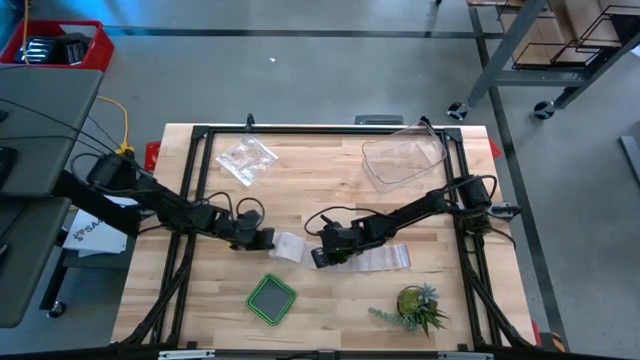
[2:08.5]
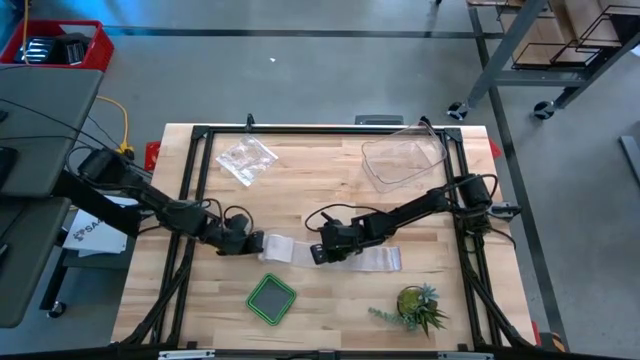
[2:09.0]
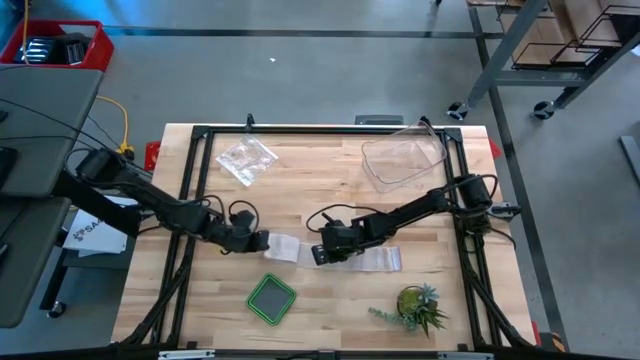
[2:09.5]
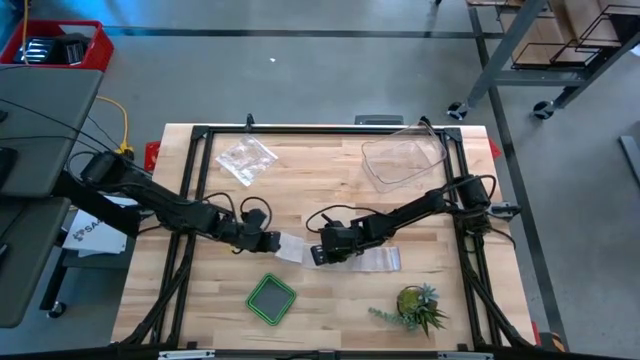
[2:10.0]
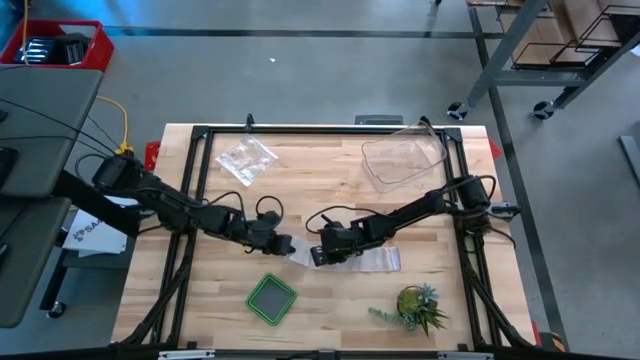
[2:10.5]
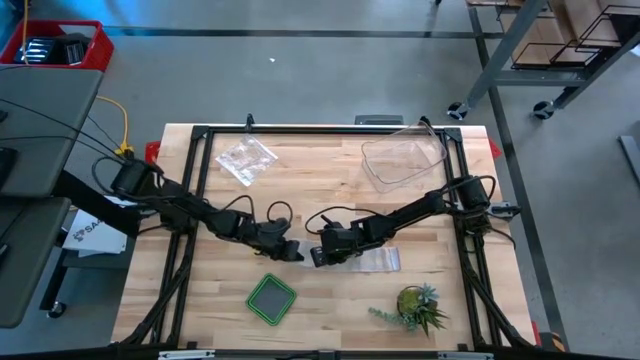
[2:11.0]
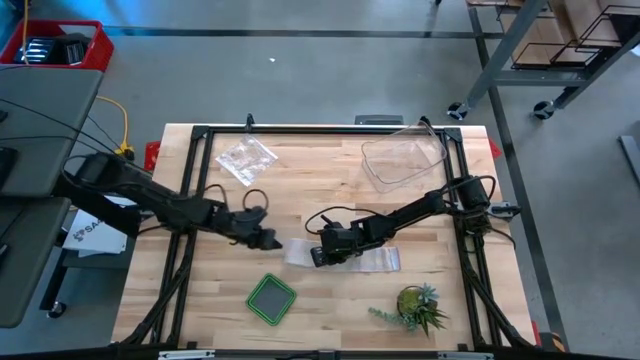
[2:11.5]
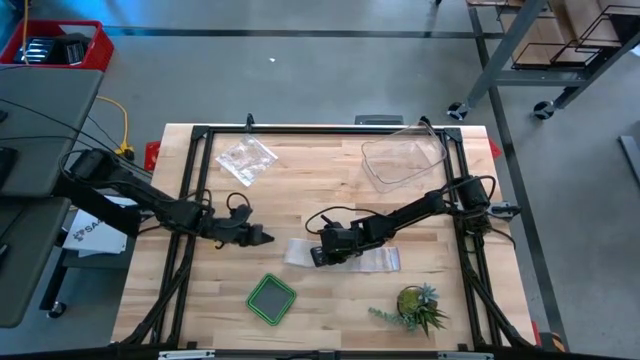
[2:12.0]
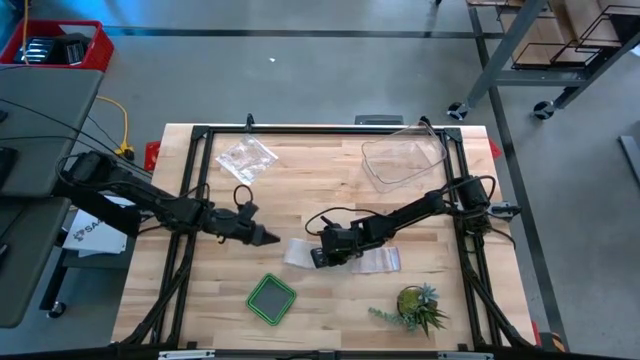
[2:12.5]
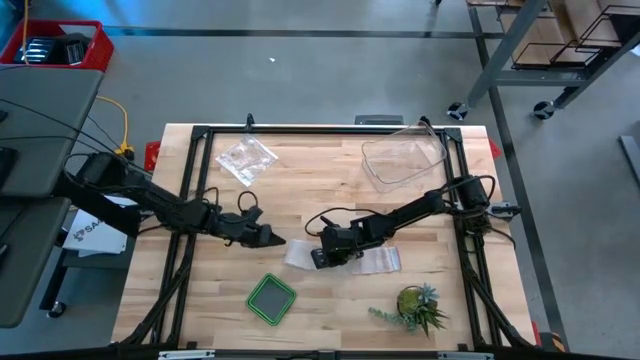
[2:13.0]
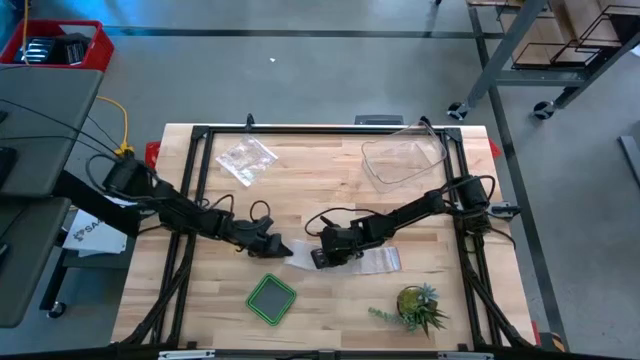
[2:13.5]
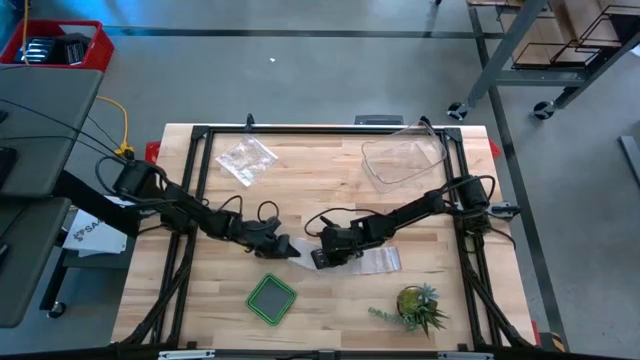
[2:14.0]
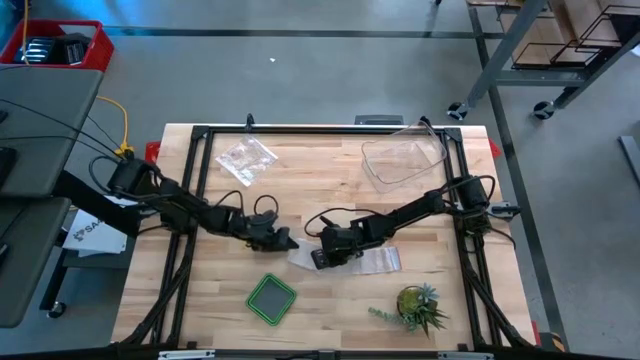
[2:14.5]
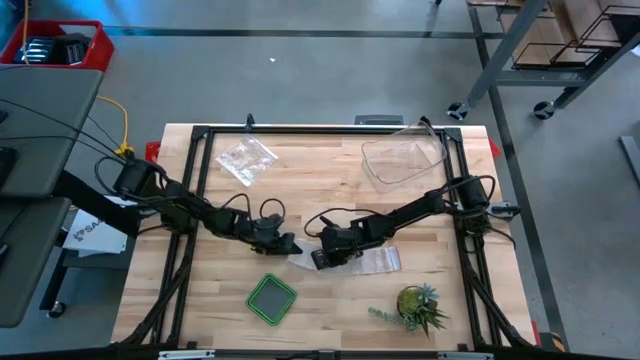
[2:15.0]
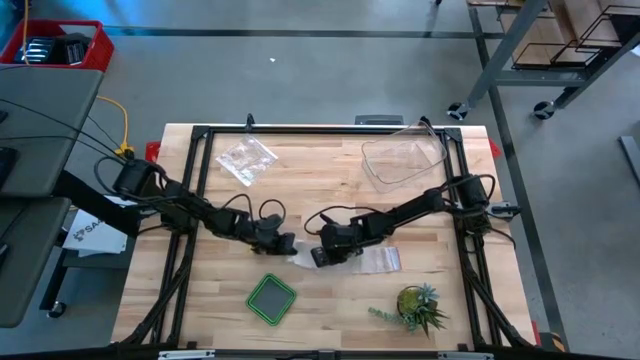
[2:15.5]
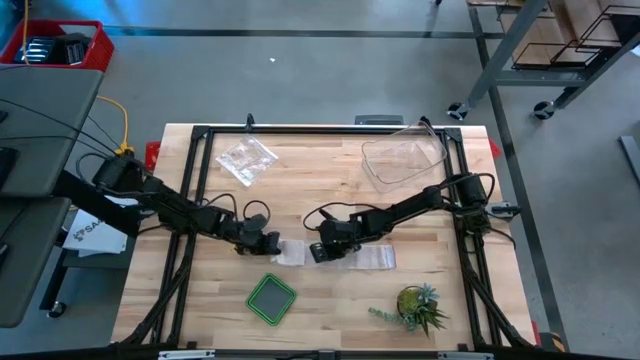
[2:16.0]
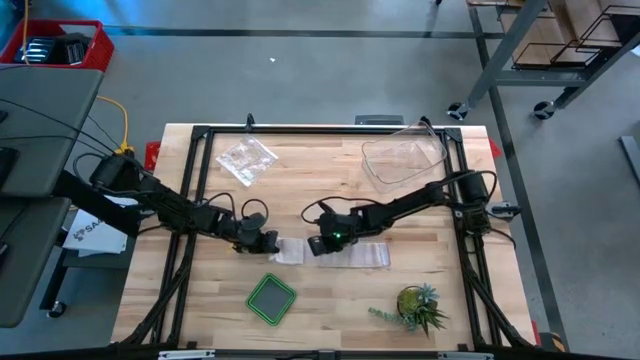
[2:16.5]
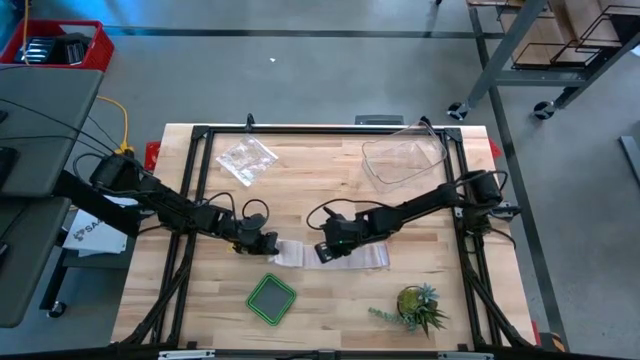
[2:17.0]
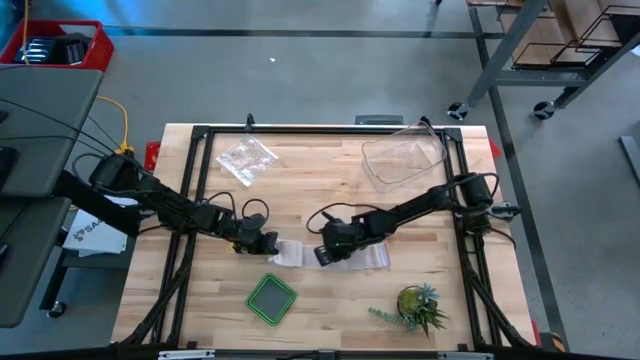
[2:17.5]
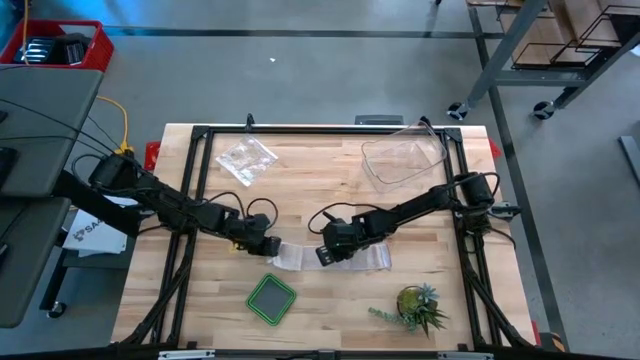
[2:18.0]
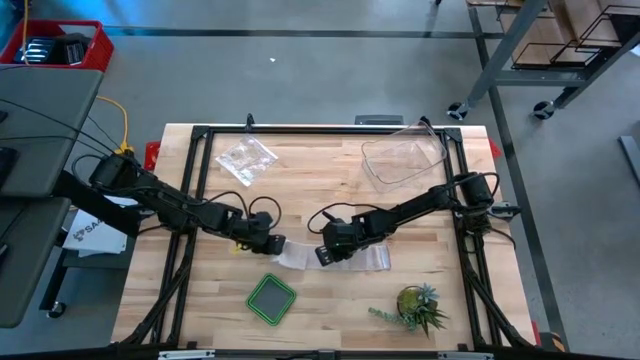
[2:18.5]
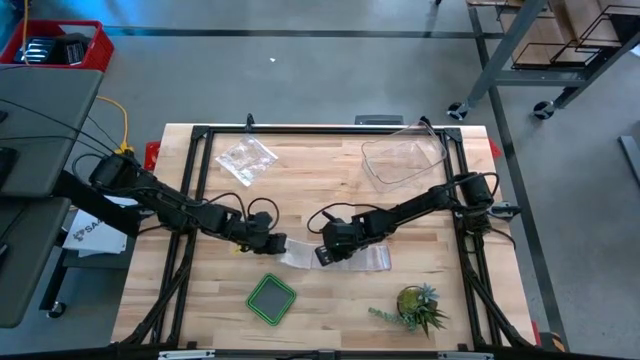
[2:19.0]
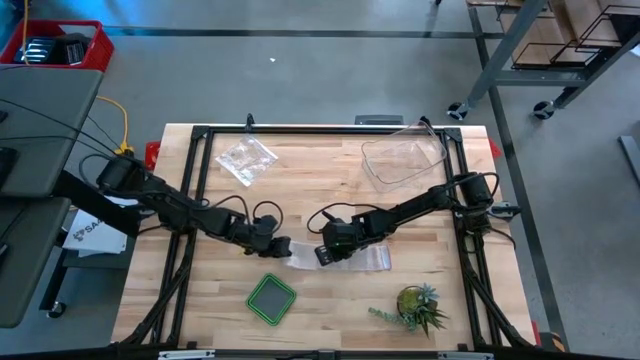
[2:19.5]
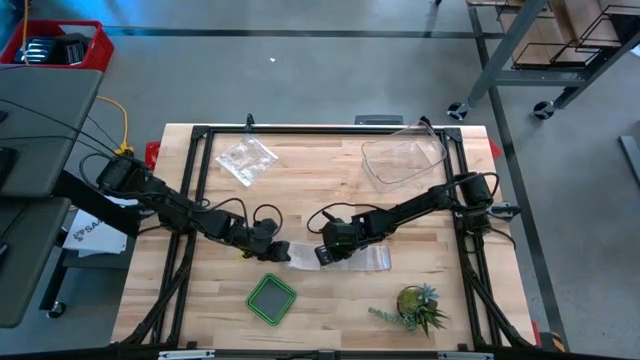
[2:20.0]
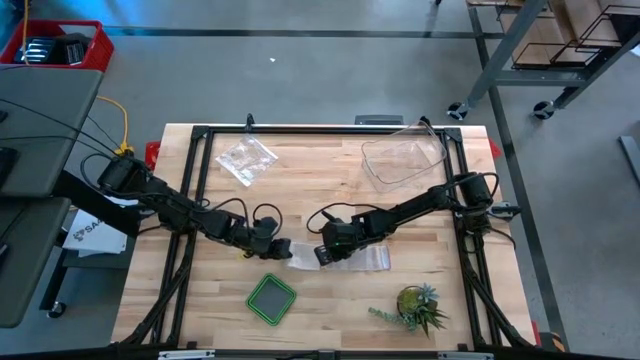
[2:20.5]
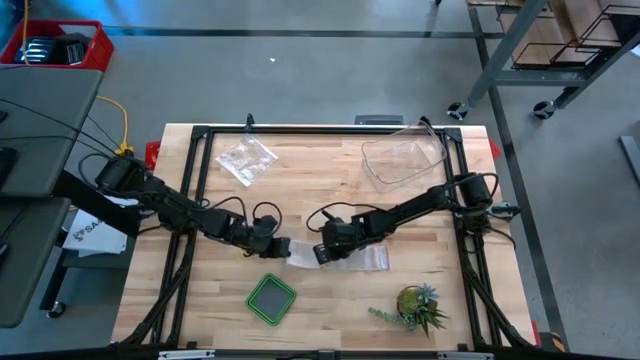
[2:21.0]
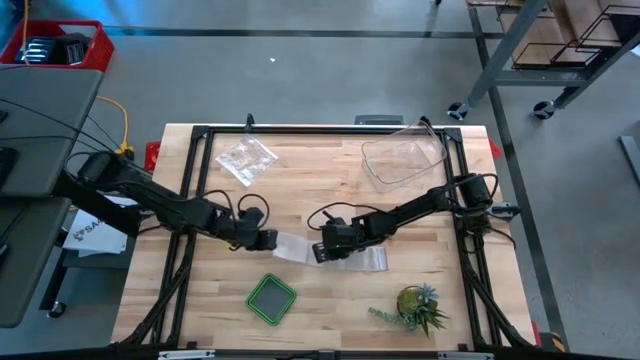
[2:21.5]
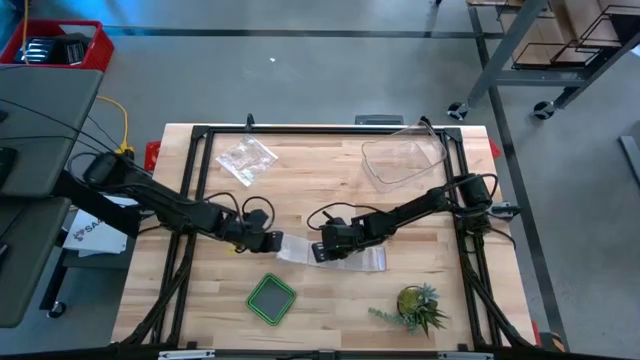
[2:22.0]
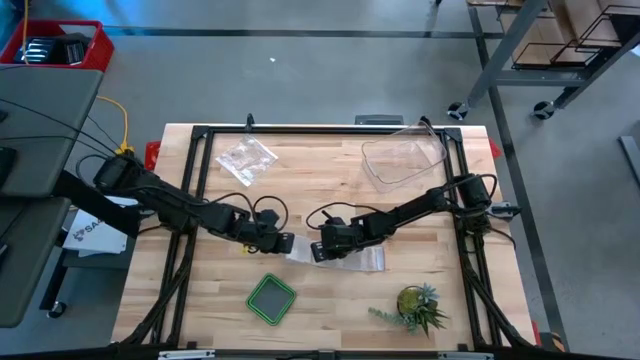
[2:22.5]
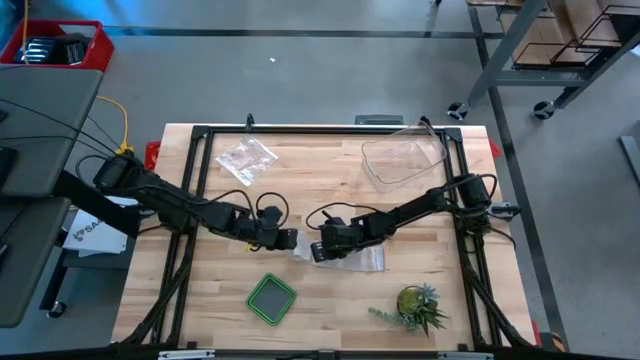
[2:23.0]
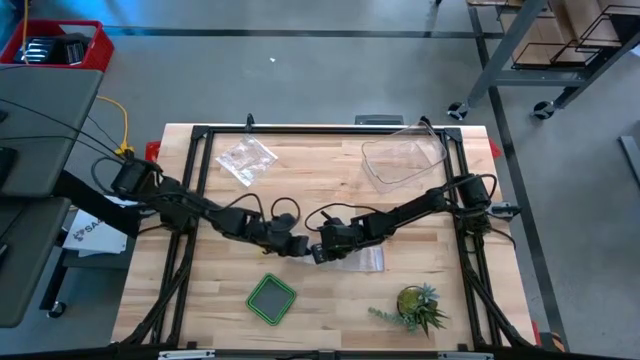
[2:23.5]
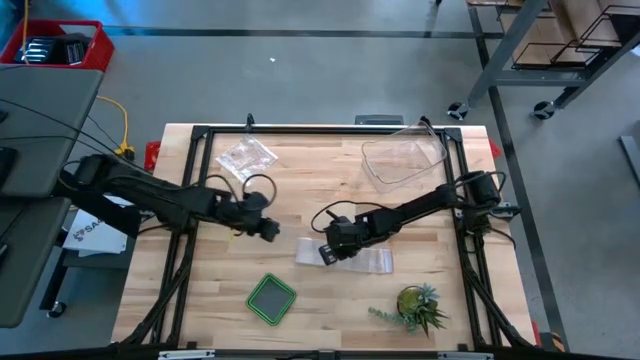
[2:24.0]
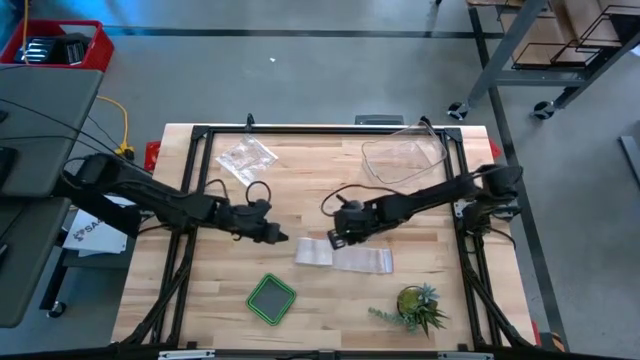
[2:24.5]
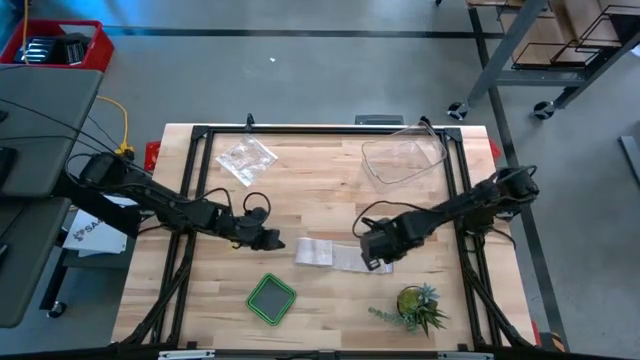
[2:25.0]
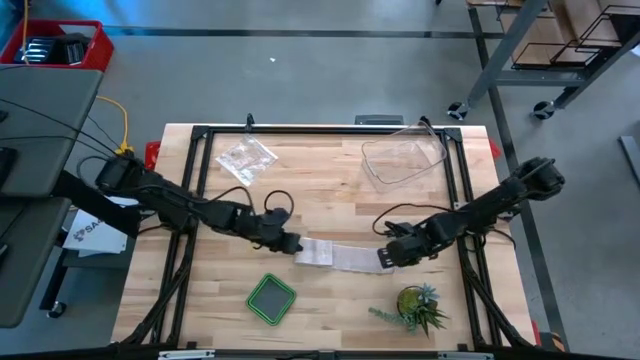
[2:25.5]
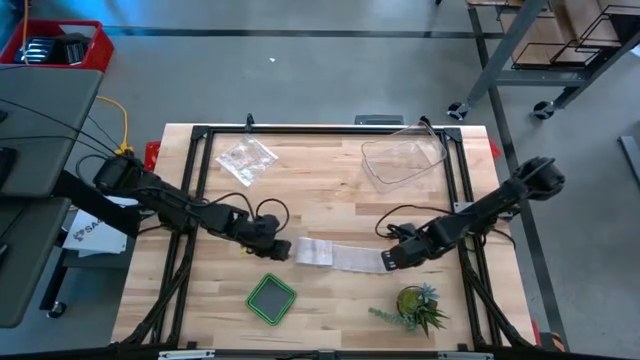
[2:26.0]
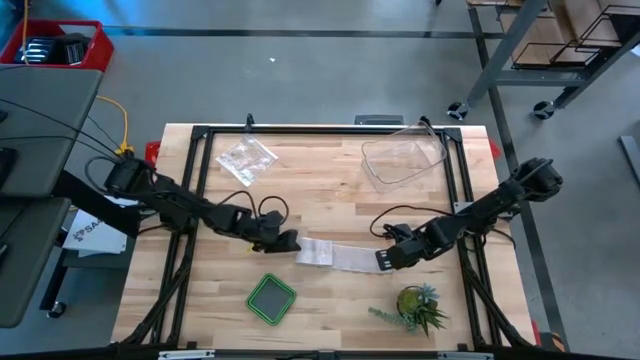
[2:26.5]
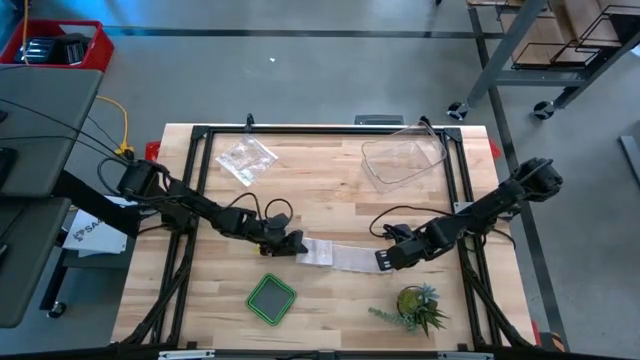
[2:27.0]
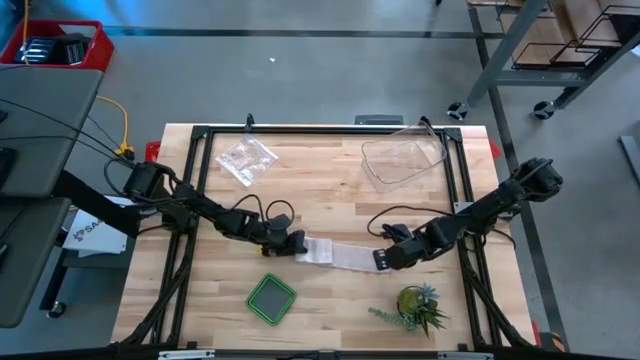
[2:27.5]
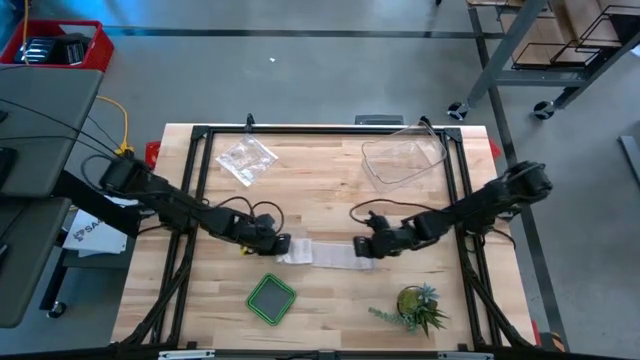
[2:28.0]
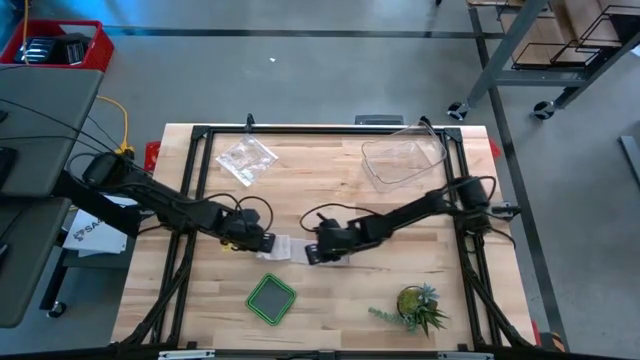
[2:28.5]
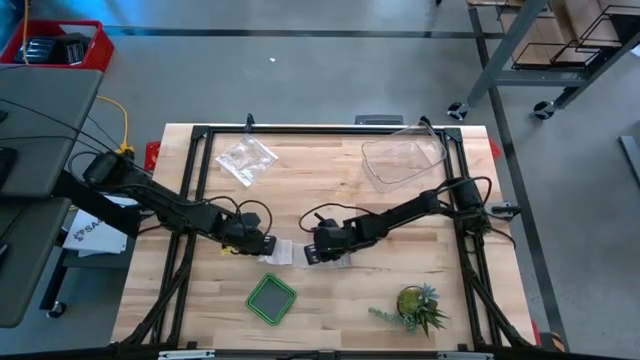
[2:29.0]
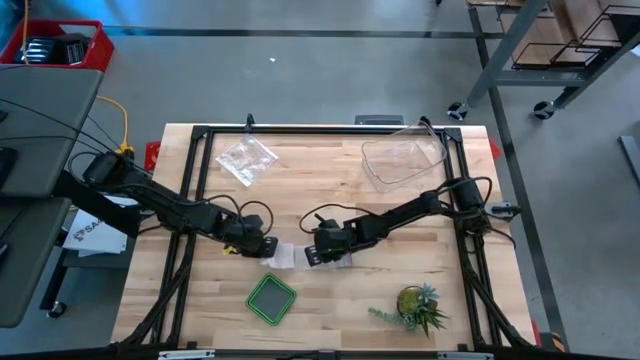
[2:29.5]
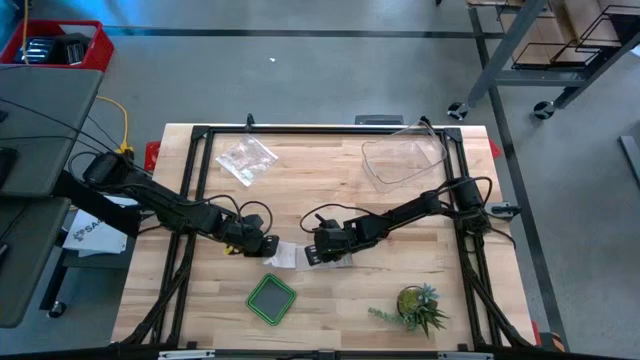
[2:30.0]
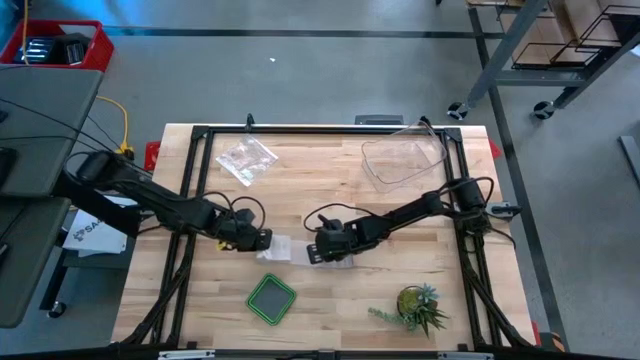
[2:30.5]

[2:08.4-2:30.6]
Task: Roll bandage
Roll the white bandage
